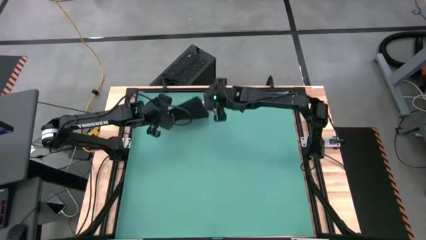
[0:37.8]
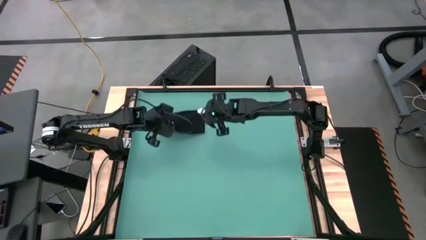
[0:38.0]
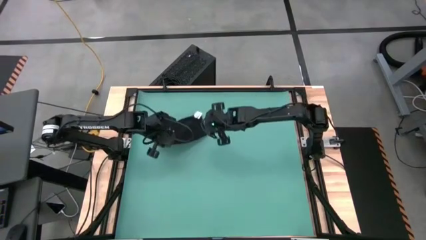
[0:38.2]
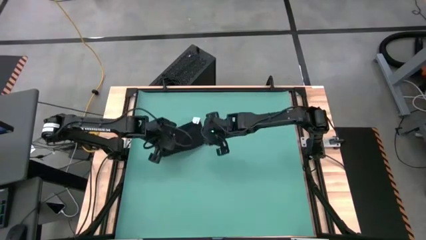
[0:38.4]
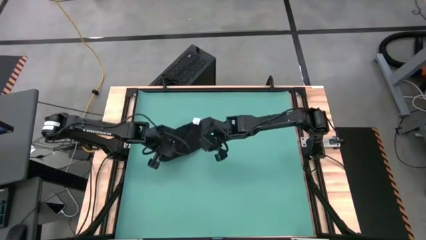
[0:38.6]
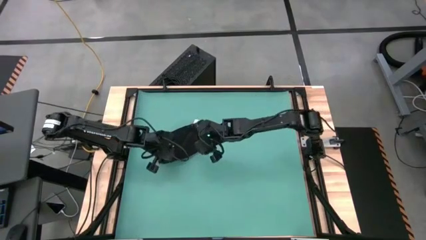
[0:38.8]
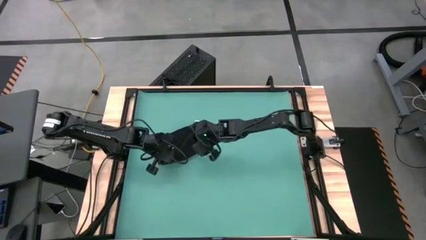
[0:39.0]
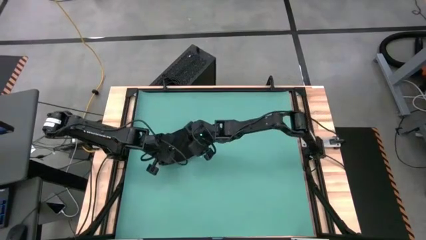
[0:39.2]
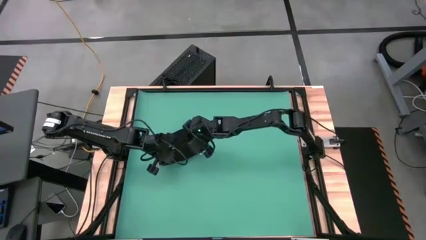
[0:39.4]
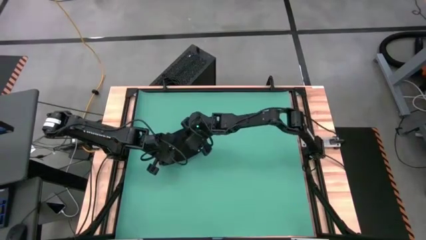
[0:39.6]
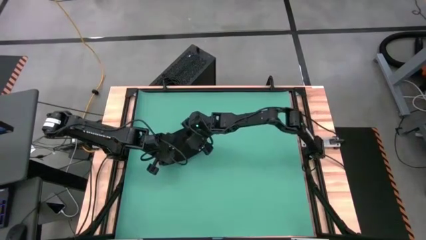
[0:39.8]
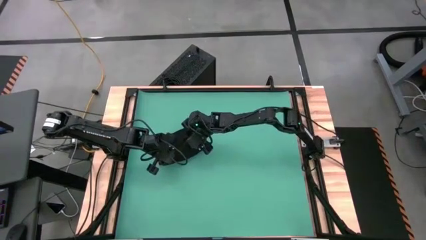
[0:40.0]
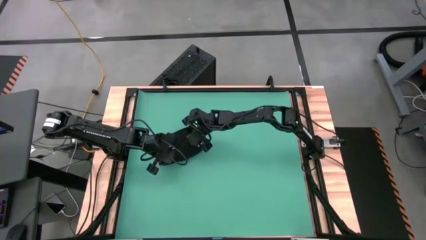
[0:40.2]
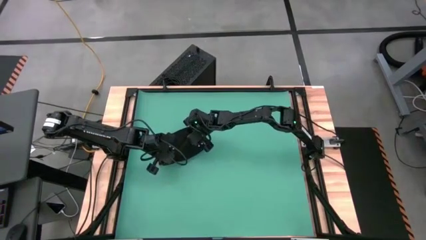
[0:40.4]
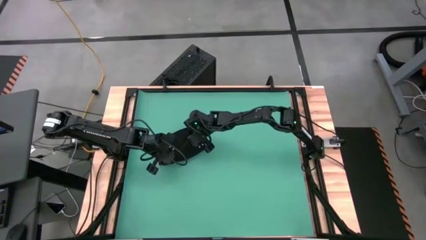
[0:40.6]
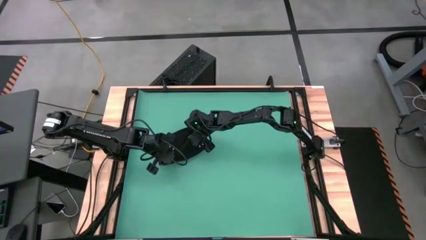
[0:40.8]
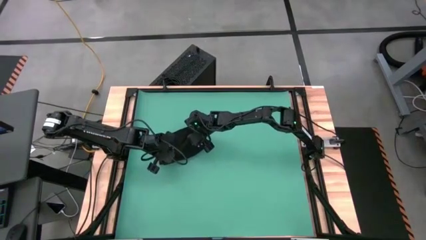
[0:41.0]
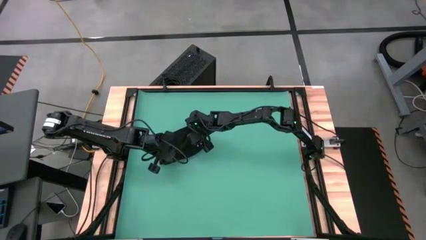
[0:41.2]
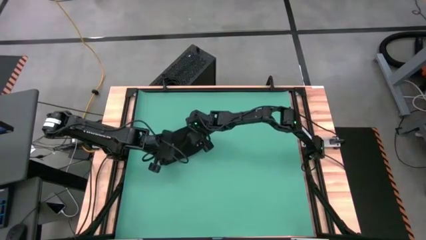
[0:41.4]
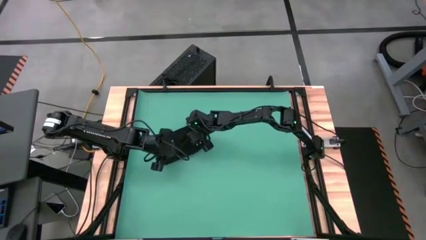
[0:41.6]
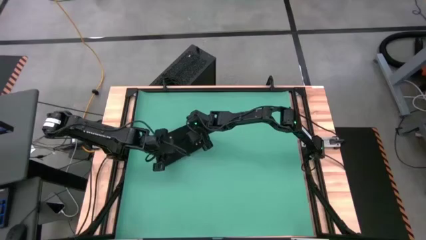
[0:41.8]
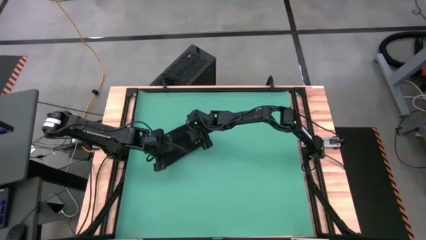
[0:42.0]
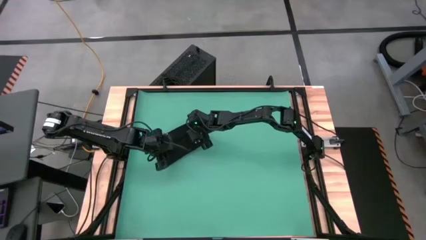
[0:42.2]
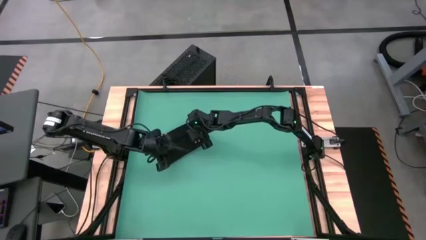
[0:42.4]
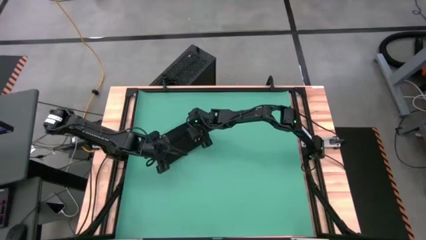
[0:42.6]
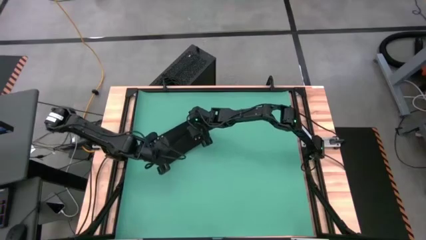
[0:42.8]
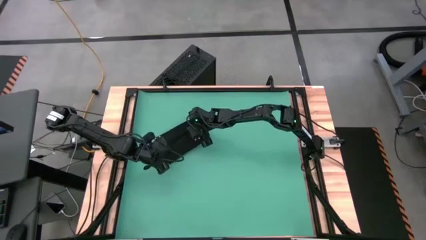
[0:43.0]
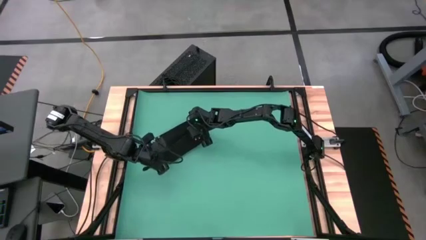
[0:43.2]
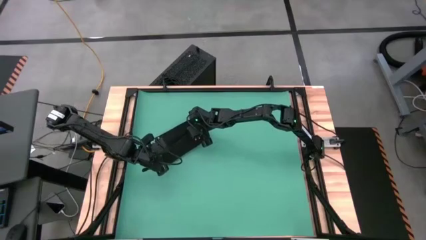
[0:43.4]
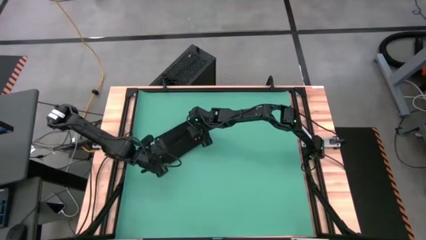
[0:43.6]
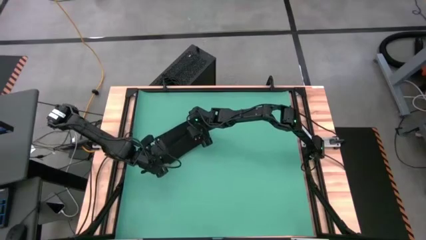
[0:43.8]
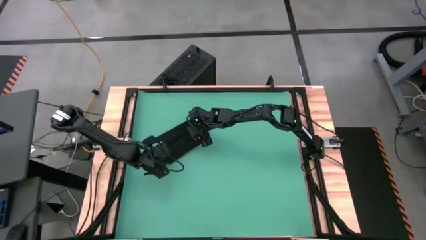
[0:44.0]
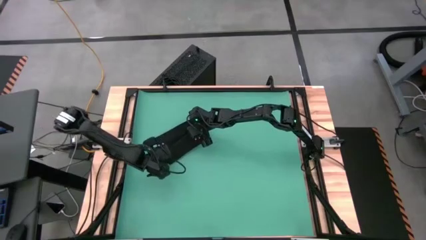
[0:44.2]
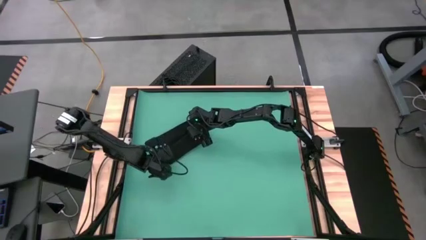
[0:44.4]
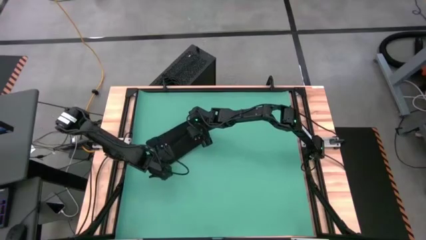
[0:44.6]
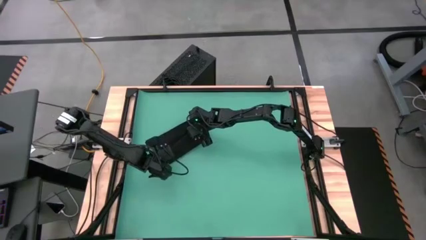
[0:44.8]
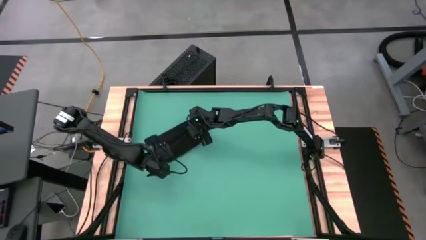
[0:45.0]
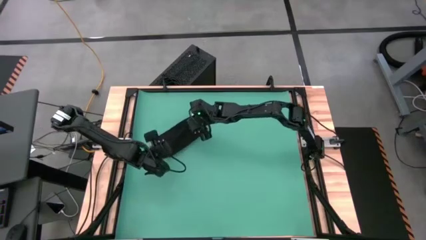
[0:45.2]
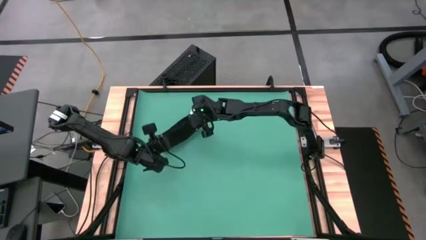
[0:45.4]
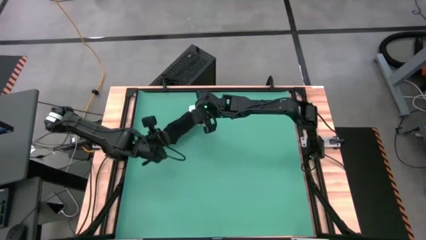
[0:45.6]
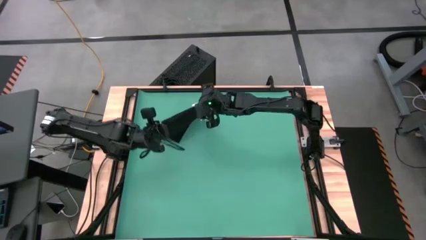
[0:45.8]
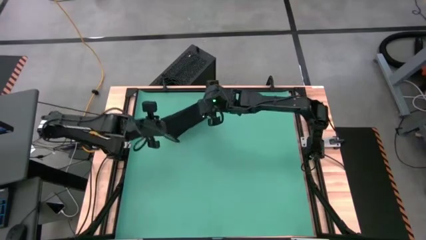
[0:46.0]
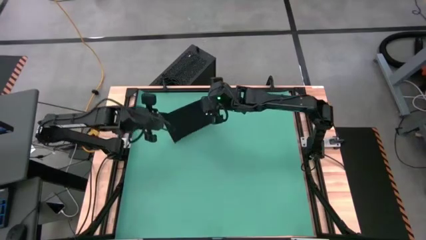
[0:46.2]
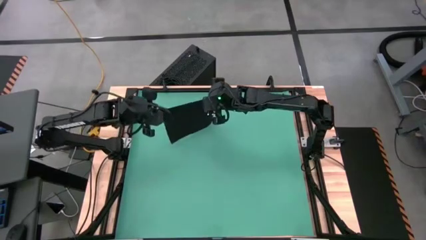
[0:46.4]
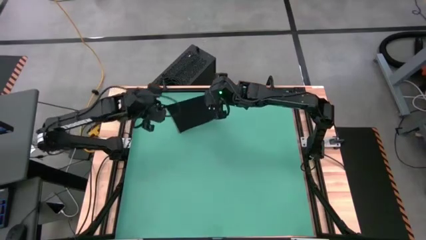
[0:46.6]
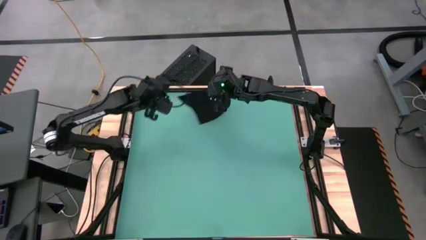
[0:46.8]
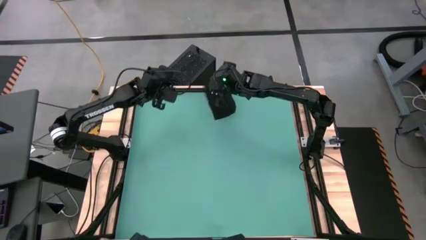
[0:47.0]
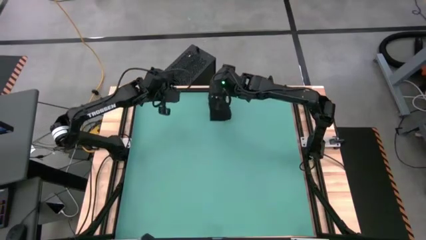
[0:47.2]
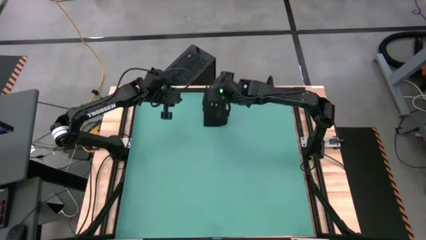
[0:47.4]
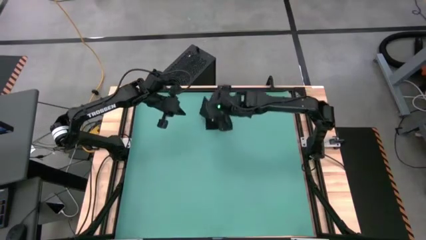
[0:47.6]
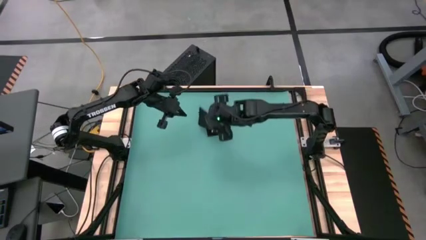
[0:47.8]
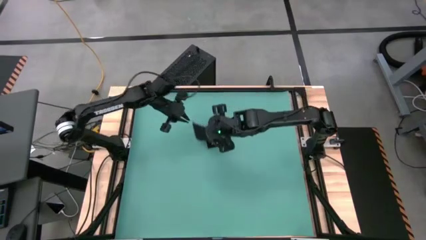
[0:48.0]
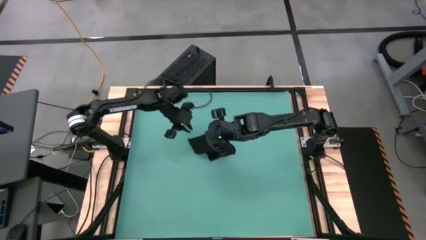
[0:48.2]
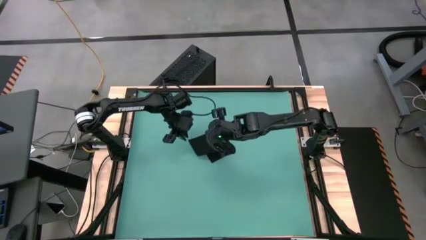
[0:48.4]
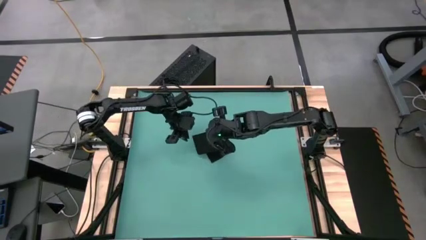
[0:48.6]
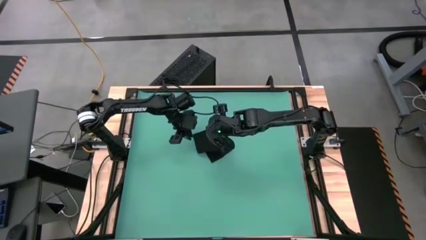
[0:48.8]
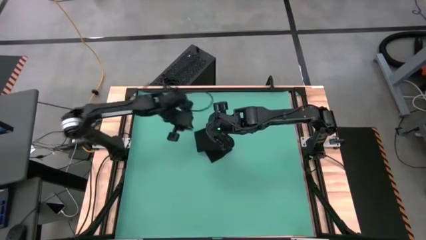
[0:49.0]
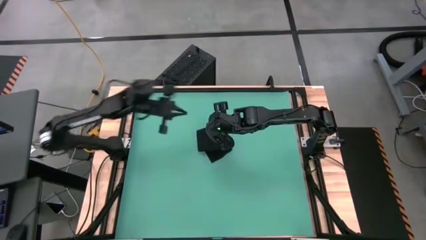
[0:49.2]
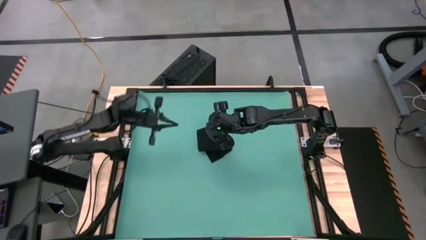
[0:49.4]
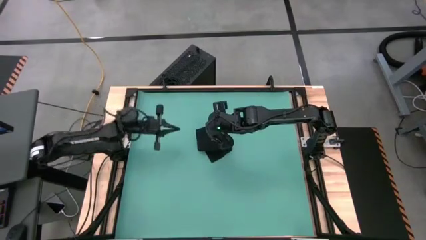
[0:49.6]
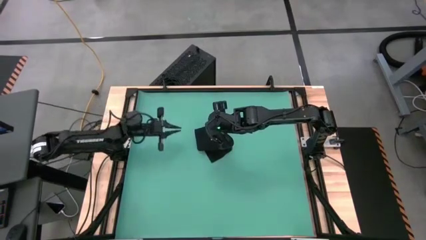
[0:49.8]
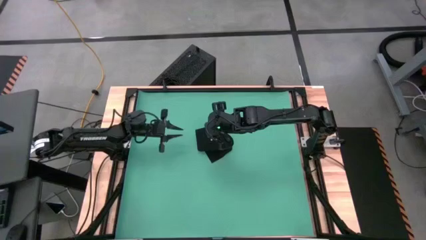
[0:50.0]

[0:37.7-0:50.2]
Task: Roll napkin
Fold the black table napkin
